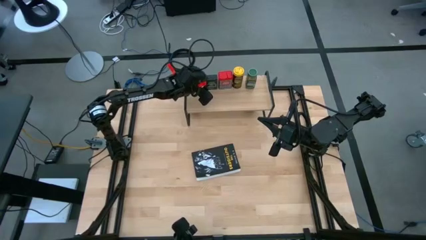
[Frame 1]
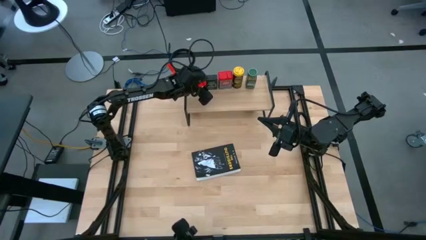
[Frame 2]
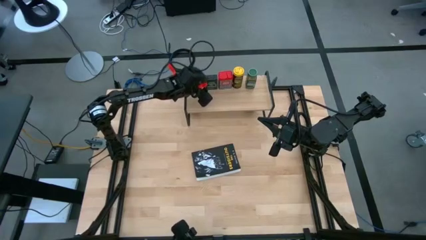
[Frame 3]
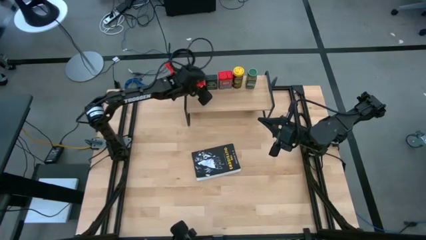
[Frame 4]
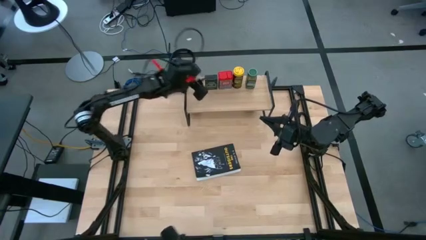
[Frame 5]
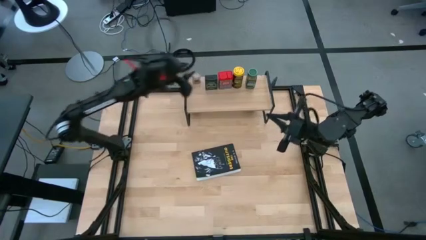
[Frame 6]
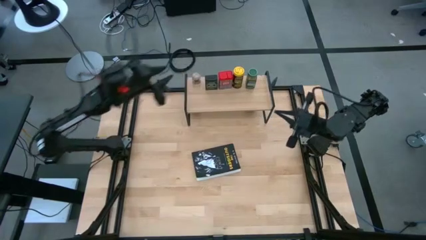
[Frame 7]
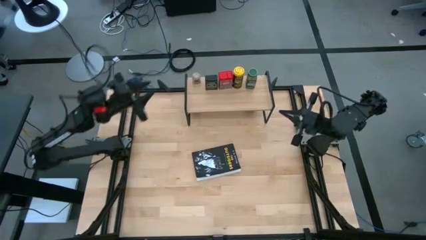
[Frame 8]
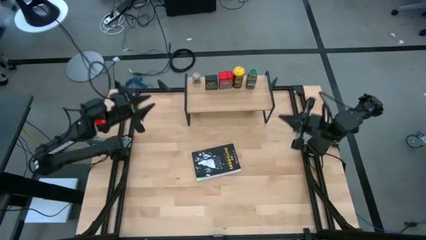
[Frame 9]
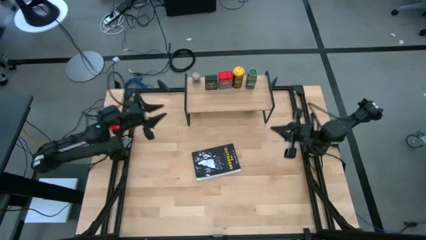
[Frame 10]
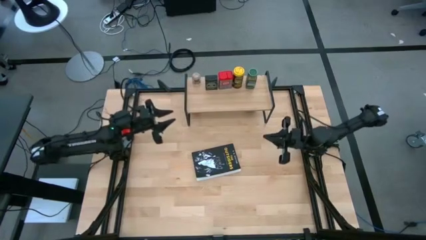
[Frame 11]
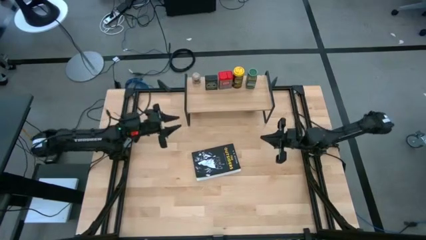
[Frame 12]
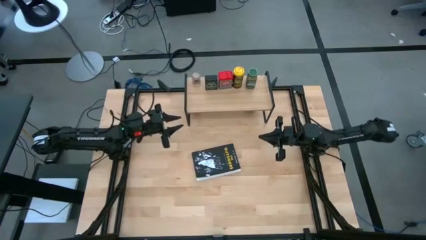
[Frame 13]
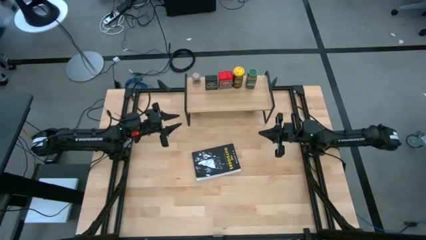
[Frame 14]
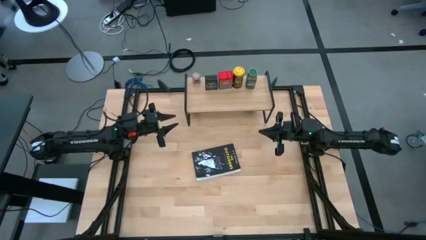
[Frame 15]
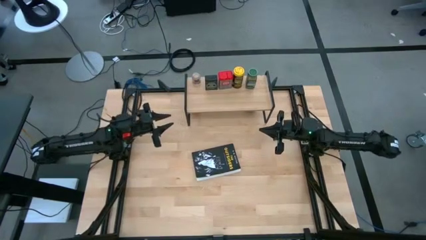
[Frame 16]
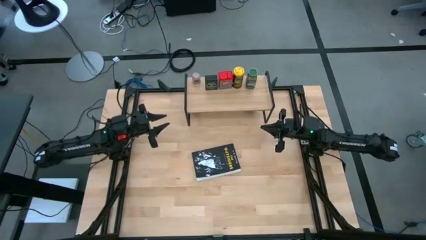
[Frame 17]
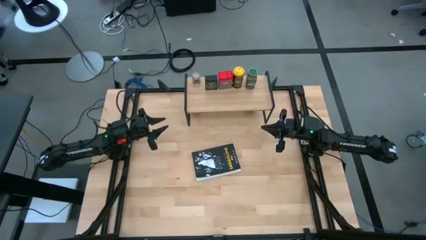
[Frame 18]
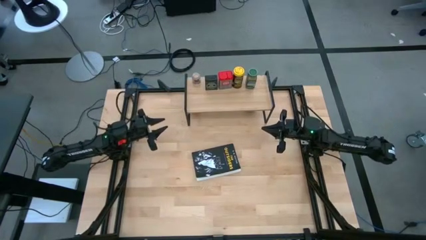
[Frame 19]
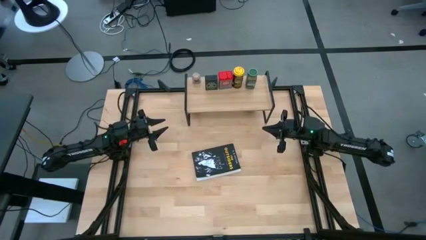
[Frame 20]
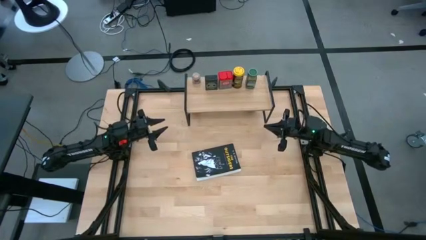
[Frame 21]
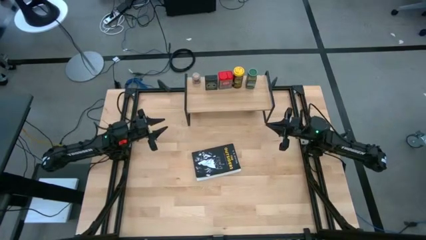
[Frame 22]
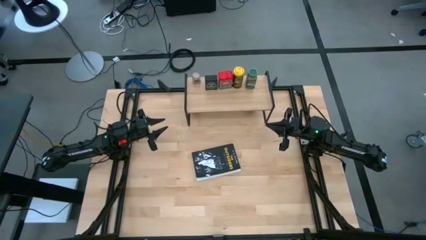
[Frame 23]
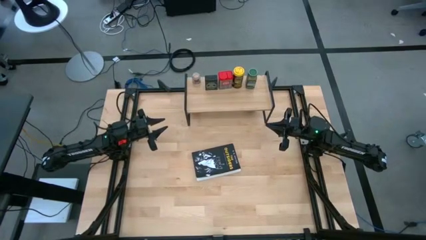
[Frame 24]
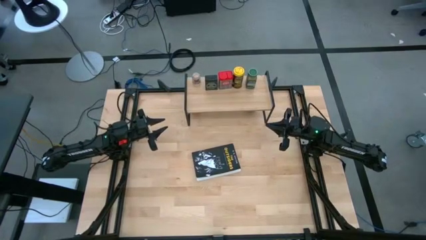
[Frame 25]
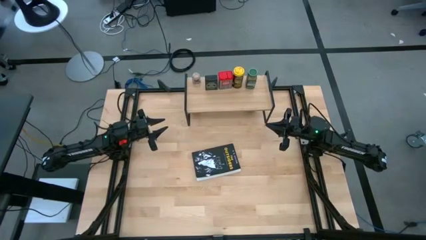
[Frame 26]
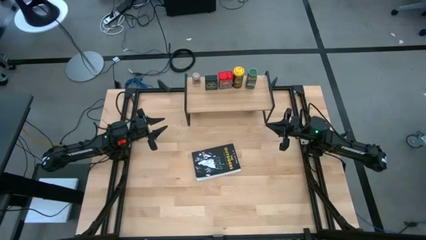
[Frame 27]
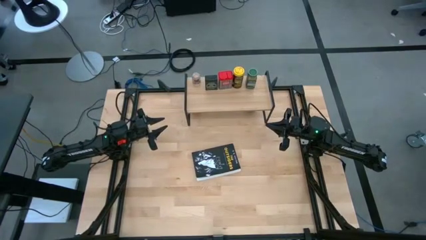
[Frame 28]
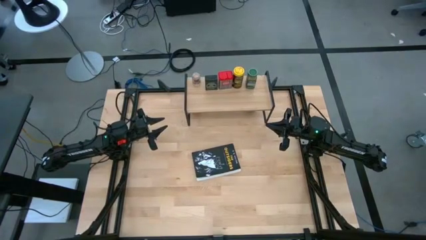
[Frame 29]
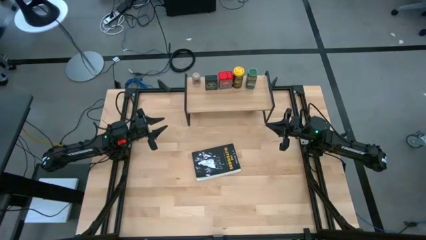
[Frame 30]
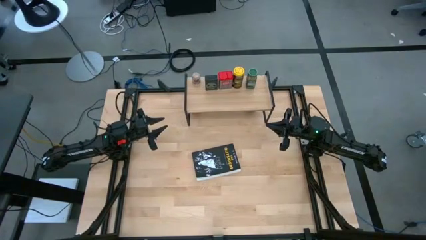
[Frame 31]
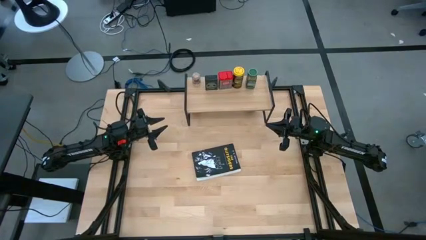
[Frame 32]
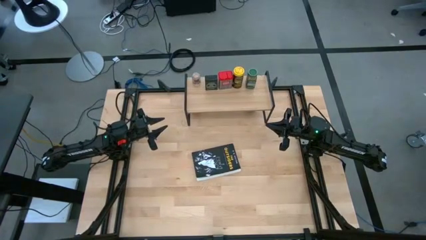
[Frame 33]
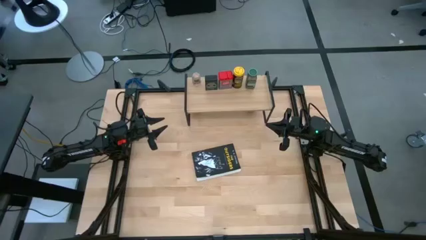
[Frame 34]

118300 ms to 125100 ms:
Task: Shelf spices
Return to Home Position

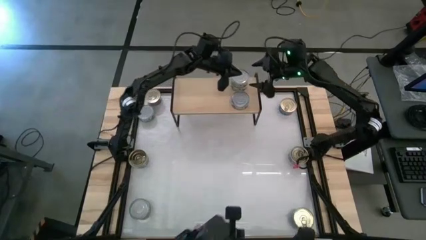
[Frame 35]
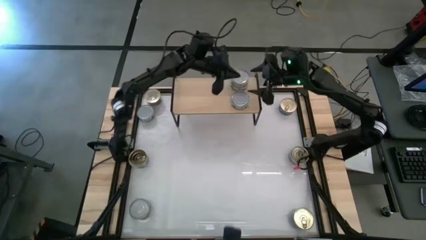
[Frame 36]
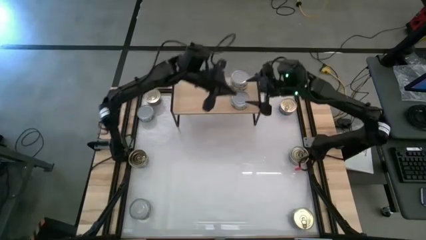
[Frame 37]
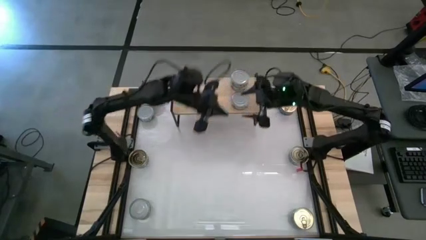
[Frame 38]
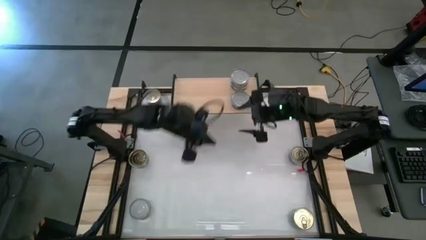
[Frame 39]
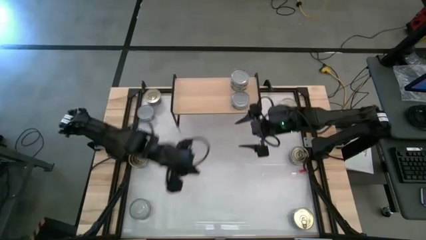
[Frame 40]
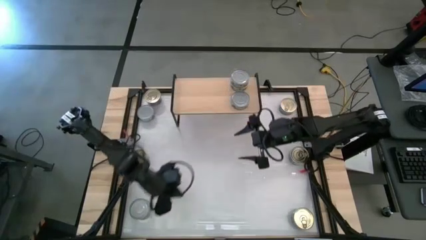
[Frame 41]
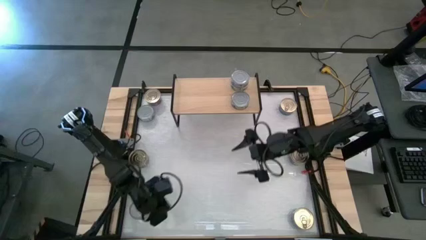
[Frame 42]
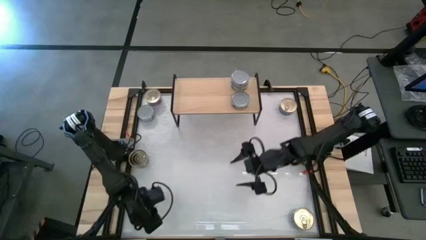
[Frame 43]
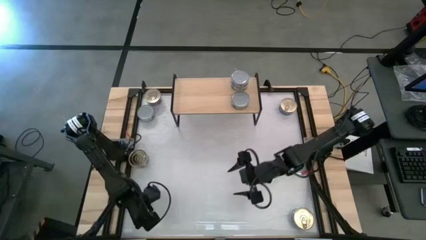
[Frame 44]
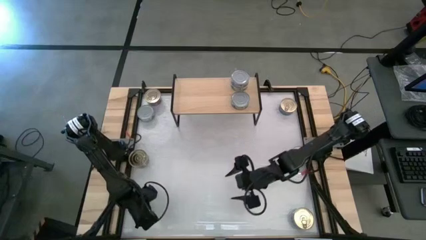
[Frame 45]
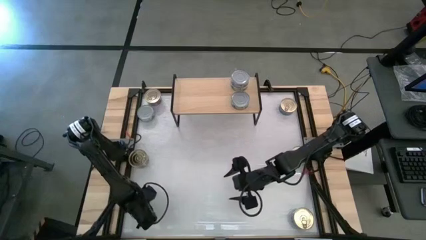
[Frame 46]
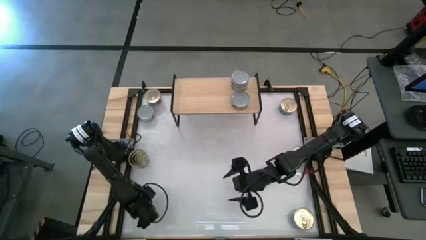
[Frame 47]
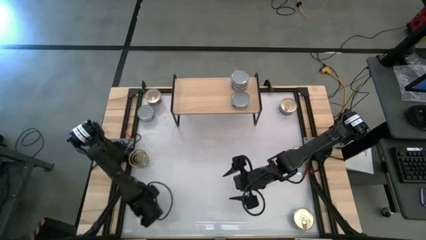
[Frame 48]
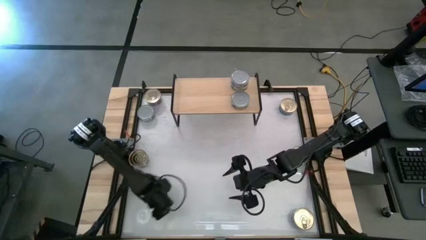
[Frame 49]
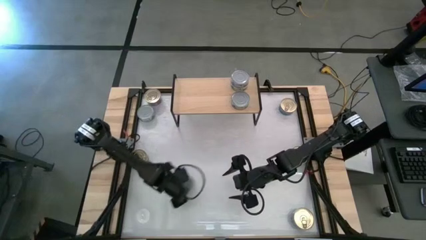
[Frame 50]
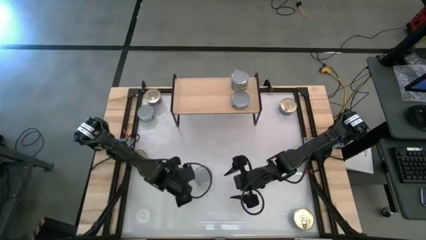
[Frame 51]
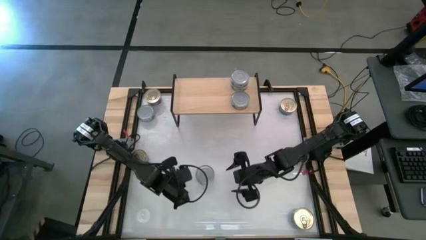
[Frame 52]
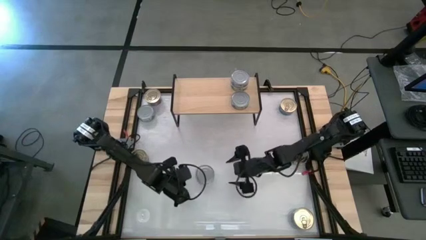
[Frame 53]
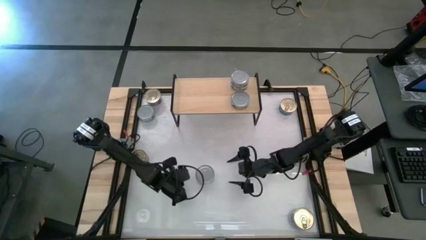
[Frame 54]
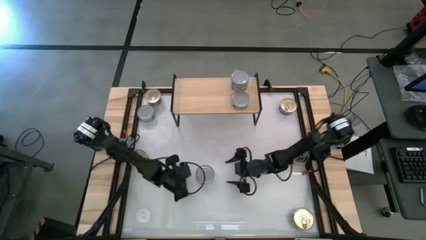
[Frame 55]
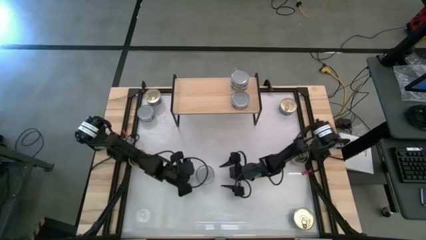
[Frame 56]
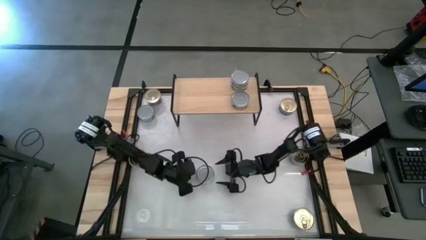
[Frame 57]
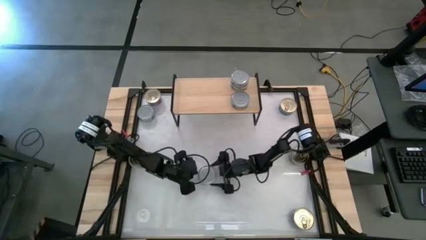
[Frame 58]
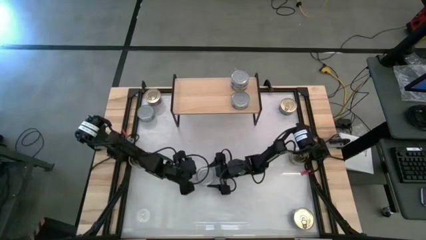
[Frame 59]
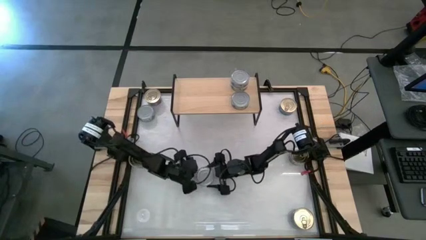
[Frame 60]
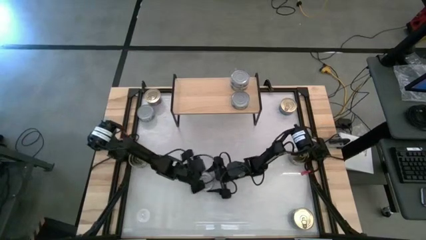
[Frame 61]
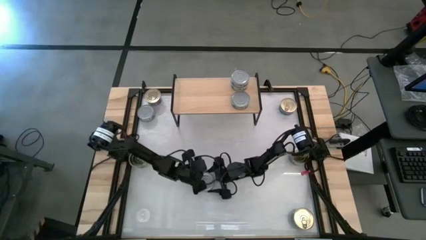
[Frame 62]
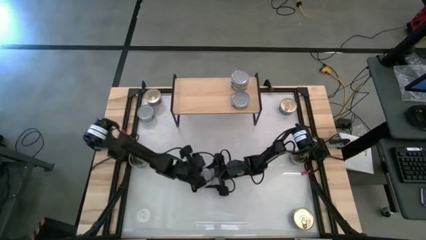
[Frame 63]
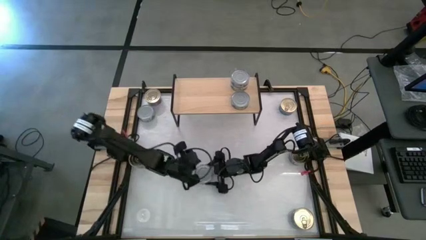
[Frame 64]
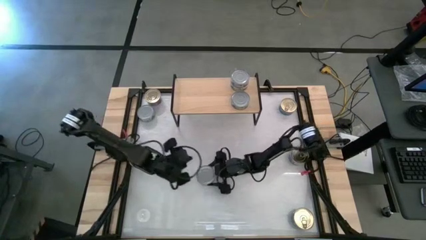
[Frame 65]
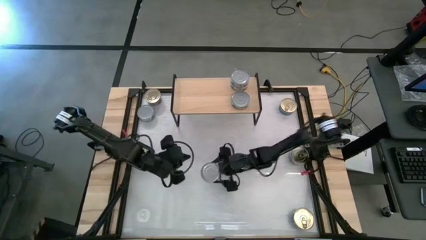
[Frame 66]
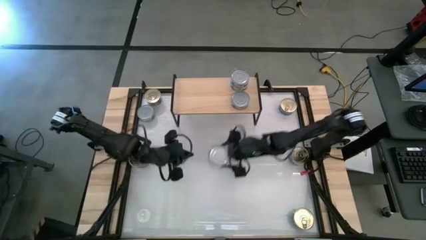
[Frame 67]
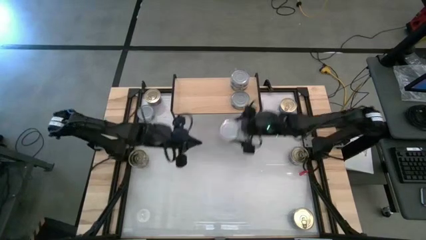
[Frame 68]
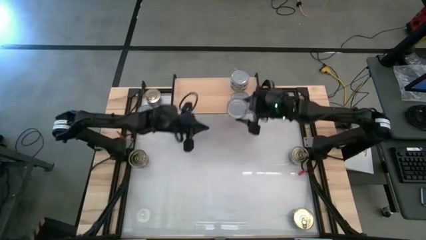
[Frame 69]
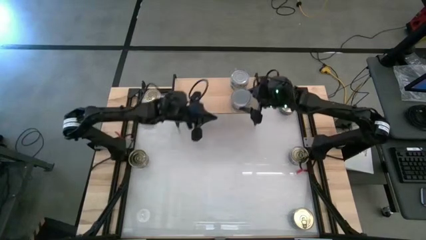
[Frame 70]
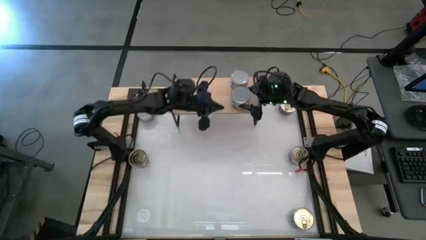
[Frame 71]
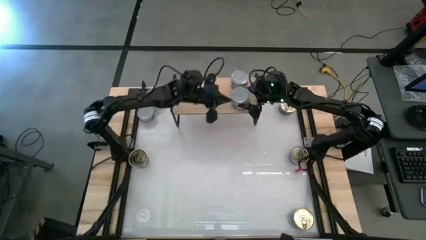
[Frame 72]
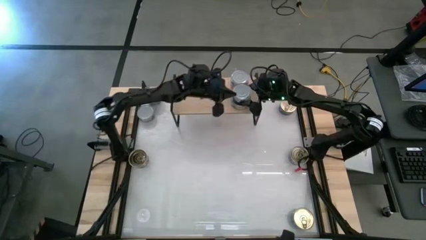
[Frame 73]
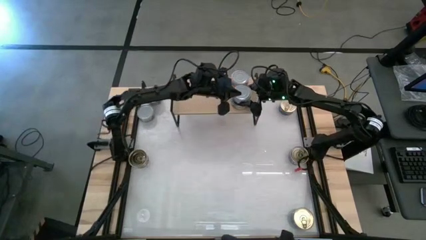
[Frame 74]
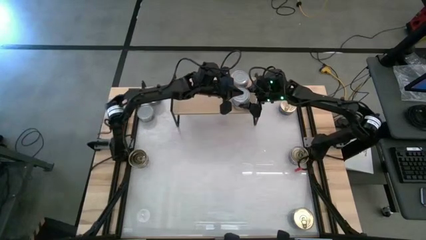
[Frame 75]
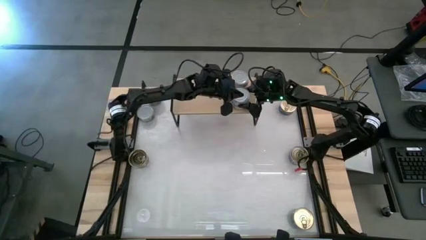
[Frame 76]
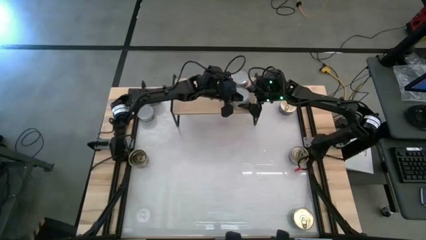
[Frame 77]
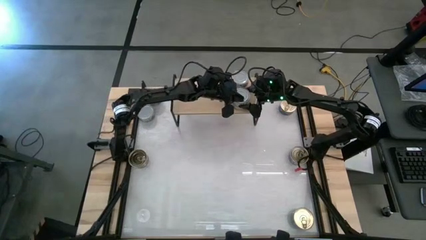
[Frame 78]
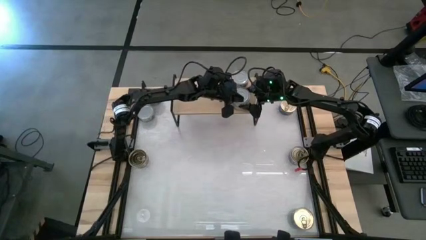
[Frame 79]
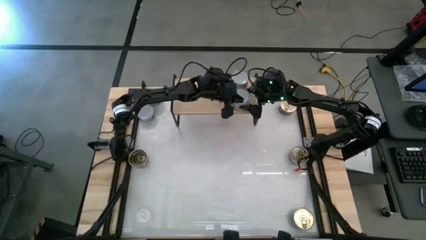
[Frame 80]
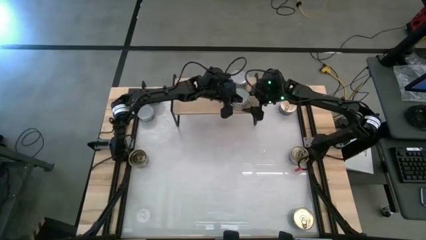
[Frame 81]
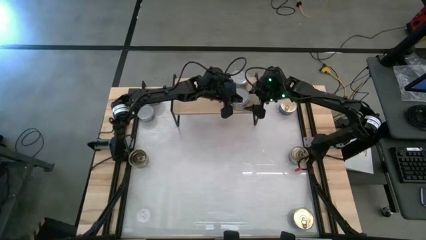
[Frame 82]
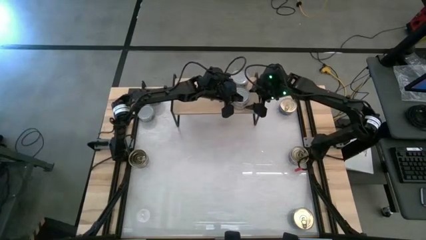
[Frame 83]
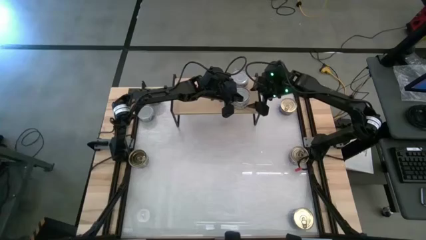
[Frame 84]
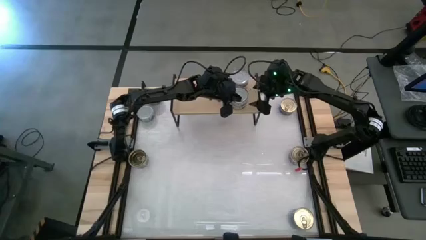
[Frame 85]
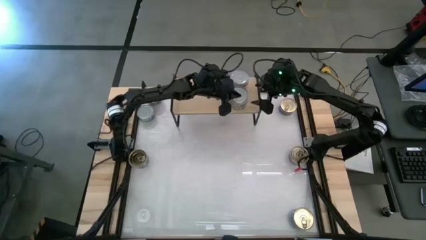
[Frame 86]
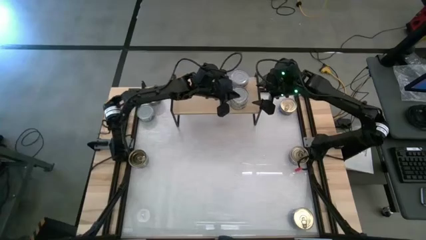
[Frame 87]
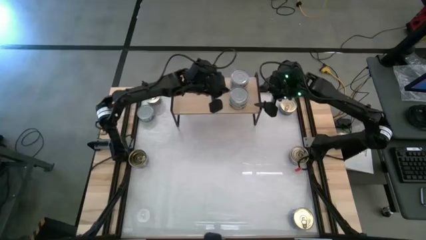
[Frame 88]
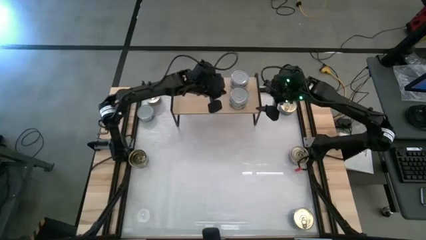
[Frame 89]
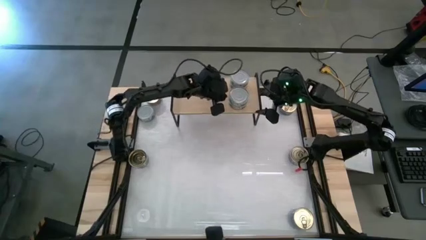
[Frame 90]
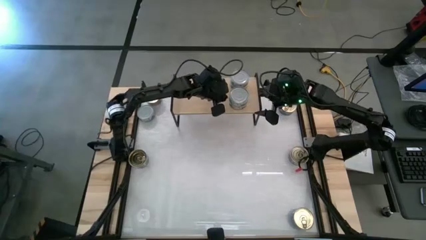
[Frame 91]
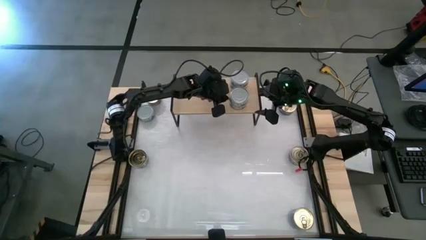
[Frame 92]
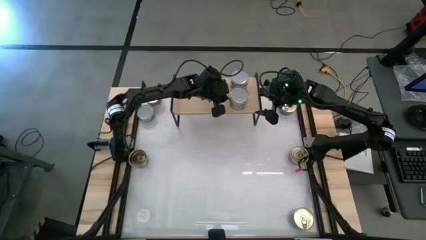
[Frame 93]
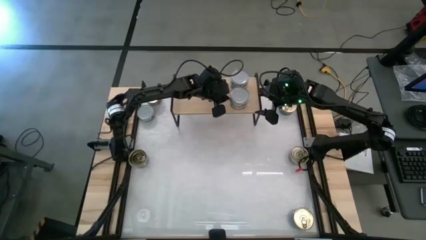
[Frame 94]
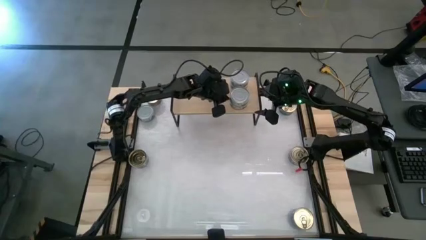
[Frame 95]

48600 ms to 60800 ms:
Task: Stack canned seafood by type on shelf
Stack the bottom green tuna can on top of the green tuna can on the shelf
